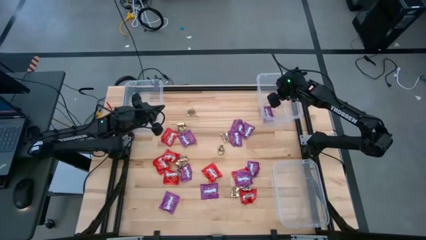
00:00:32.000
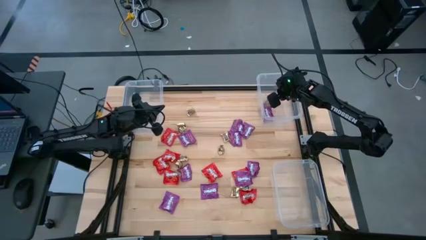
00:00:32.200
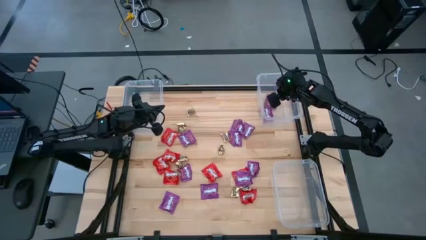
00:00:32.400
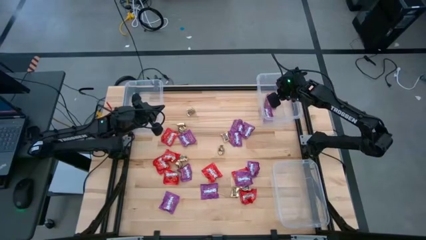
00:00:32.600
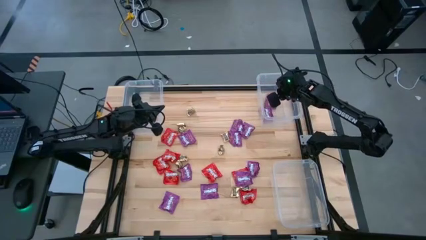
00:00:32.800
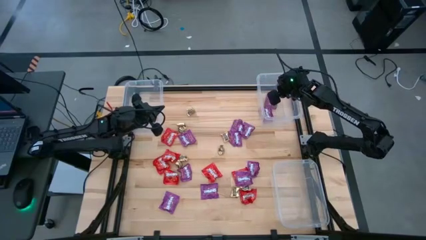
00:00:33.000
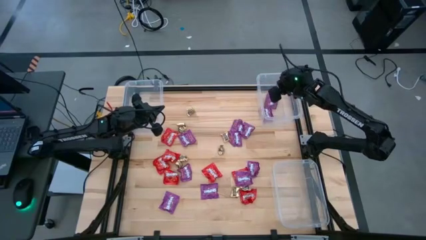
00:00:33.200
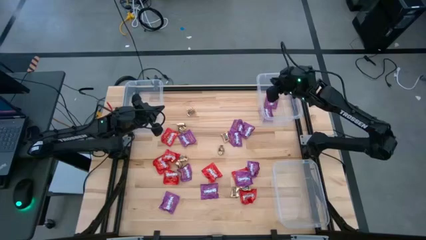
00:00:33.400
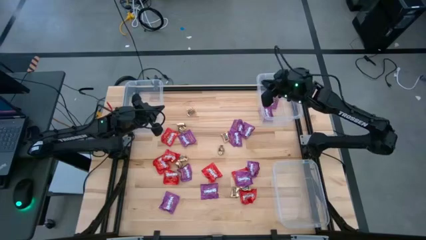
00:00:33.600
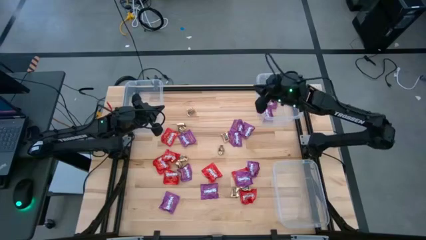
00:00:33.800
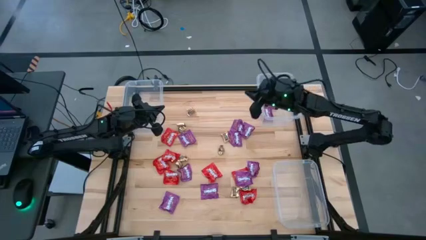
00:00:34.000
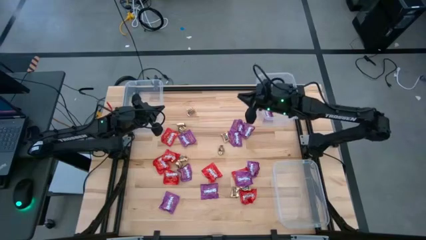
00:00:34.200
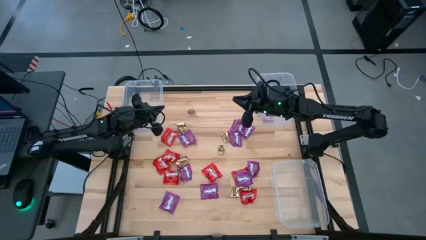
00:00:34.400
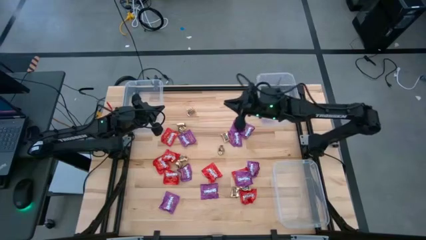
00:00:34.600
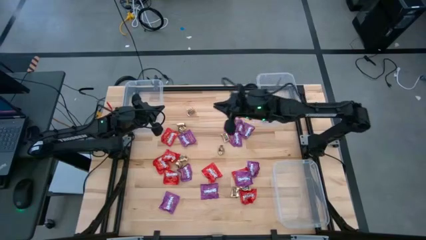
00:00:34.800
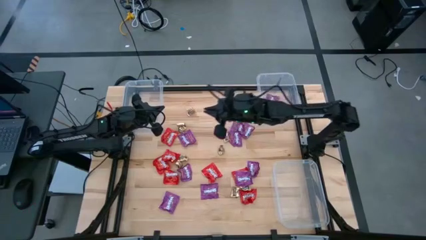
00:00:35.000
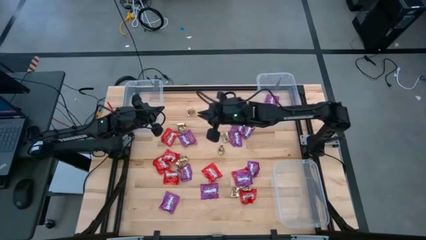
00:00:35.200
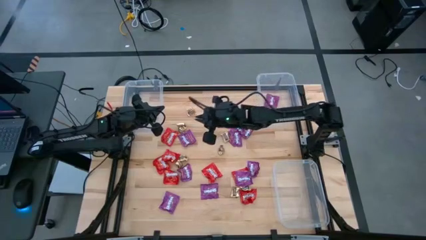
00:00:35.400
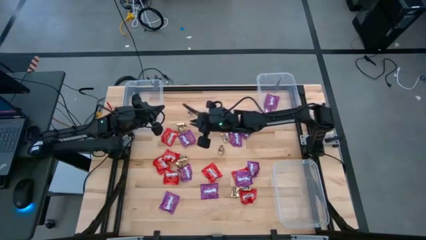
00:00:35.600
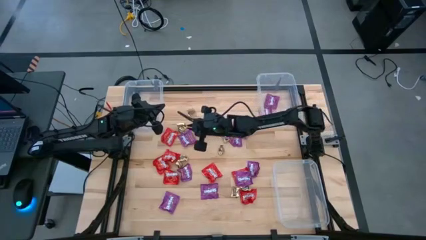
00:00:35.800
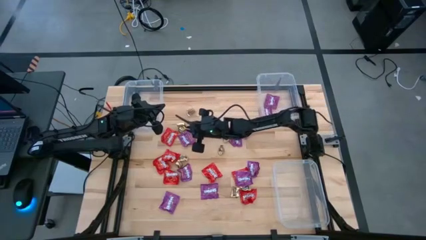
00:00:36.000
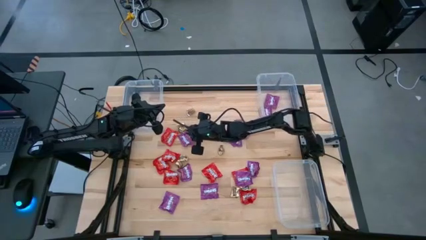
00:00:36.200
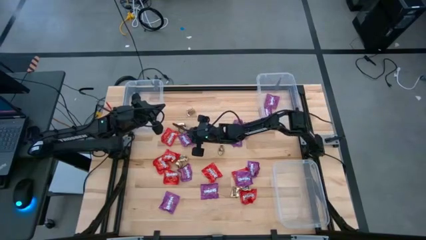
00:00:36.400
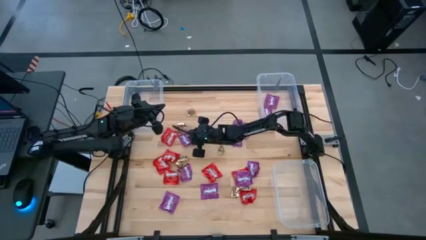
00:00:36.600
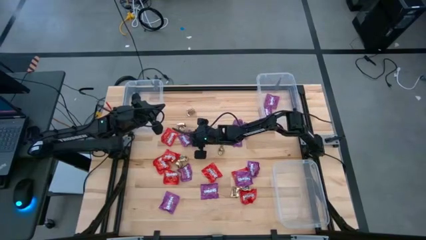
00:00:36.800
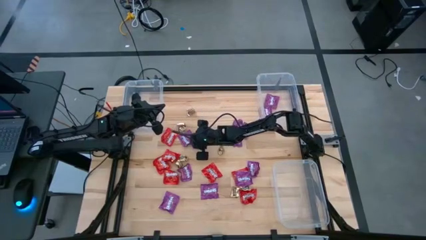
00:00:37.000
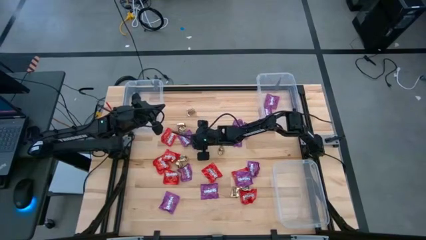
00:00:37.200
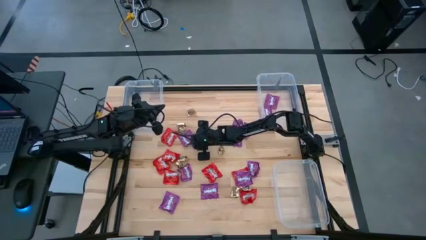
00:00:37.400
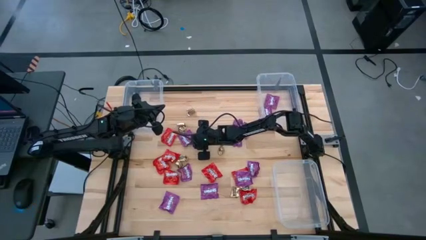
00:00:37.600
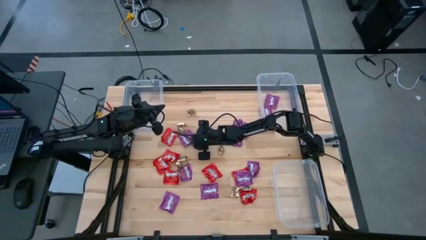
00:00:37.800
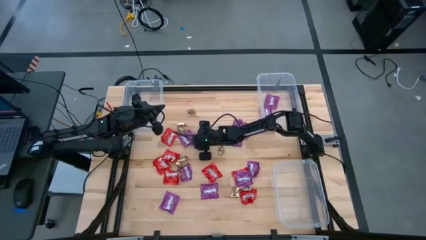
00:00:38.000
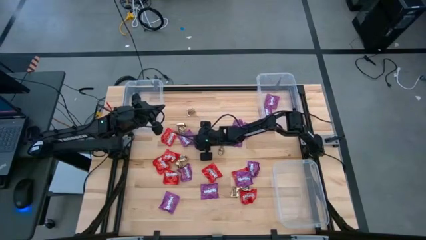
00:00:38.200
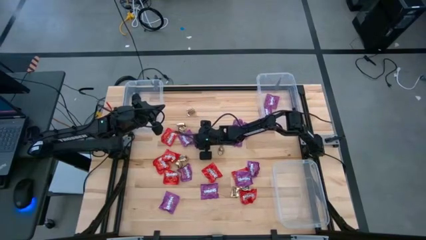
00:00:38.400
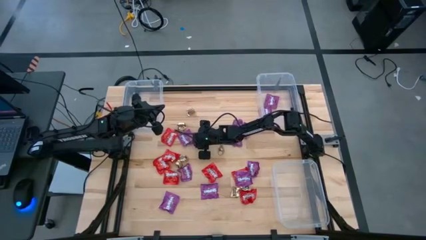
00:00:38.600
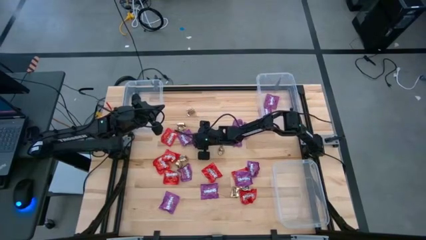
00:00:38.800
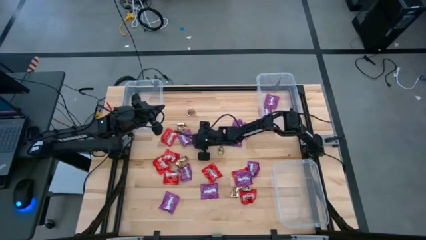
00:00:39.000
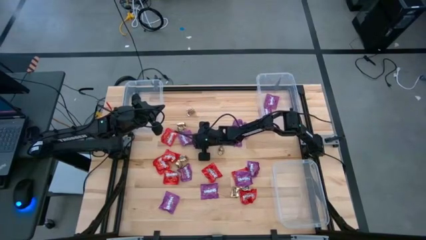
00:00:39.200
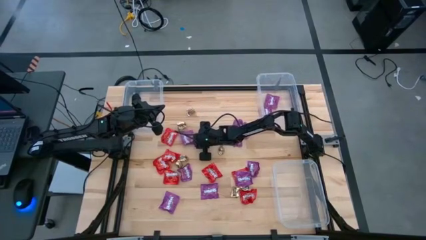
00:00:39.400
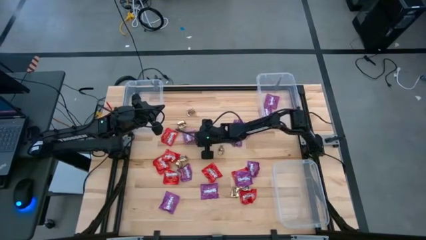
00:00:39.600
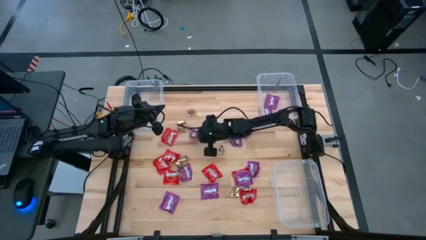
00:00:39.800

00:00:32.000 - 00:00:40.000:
Task: Sort candy
Put the purple candy into the top right transparent bin

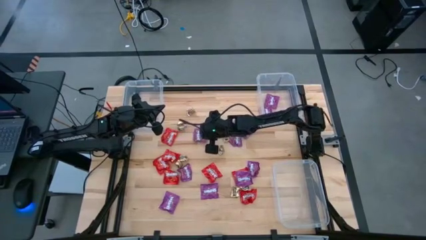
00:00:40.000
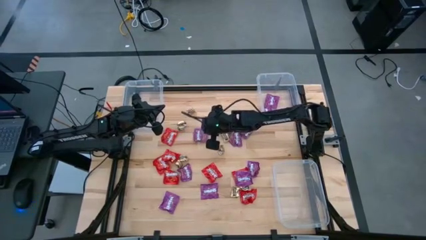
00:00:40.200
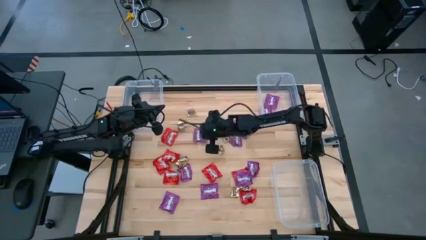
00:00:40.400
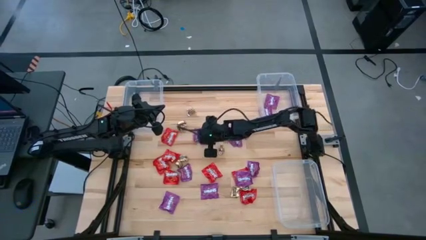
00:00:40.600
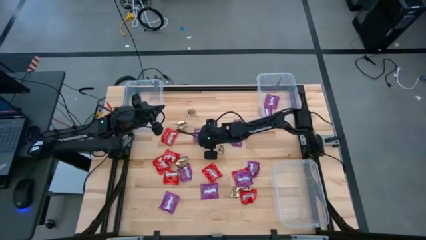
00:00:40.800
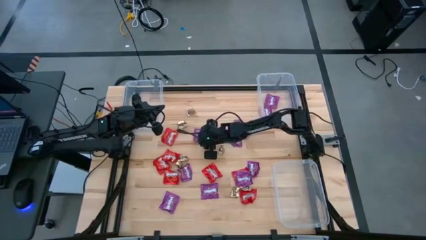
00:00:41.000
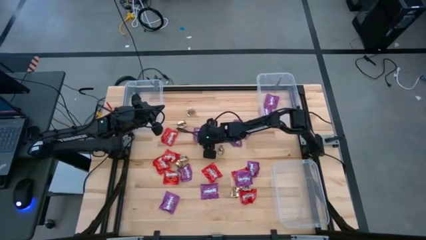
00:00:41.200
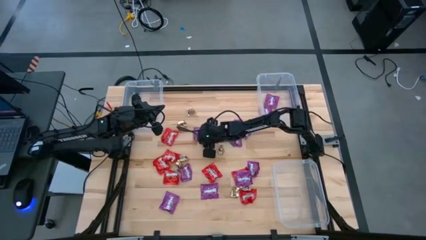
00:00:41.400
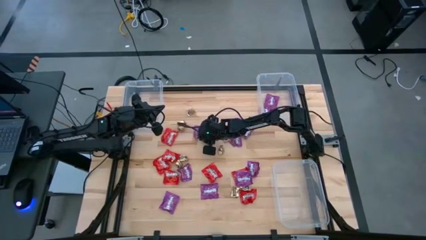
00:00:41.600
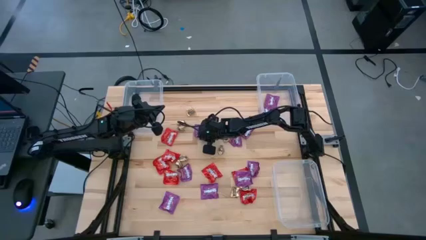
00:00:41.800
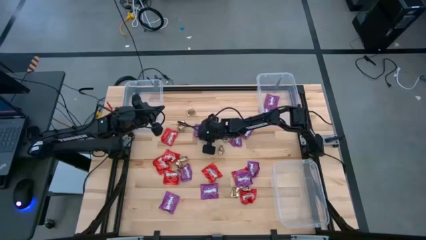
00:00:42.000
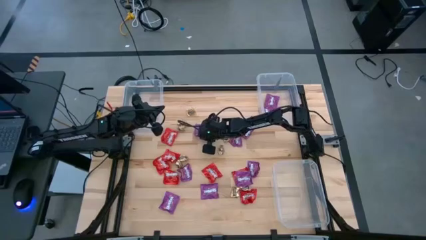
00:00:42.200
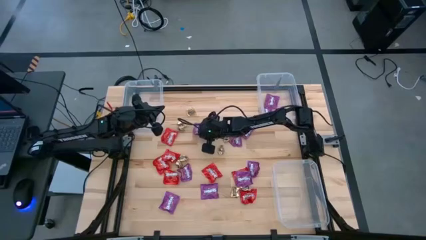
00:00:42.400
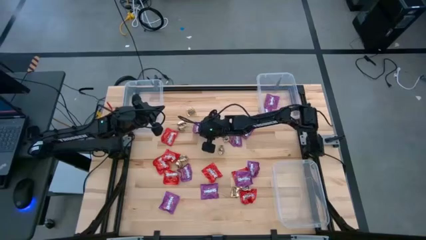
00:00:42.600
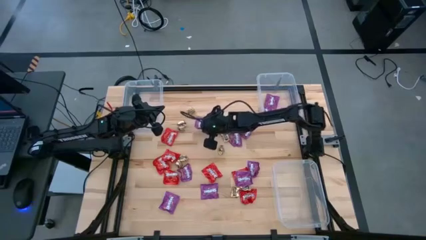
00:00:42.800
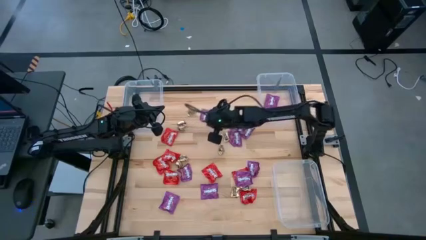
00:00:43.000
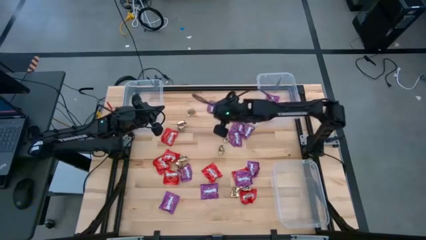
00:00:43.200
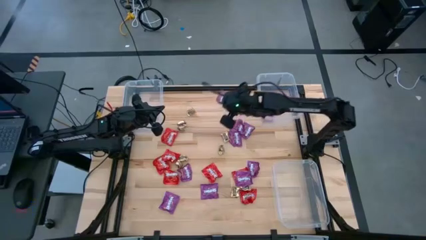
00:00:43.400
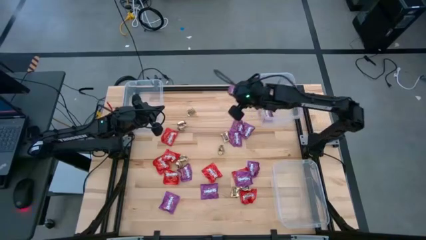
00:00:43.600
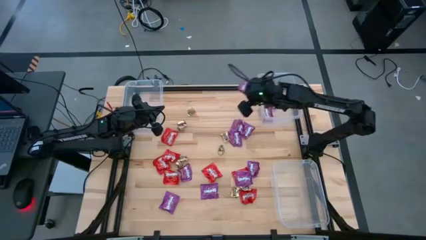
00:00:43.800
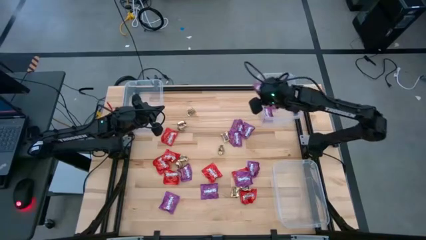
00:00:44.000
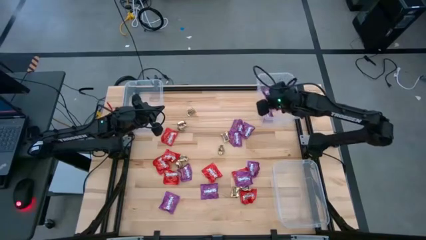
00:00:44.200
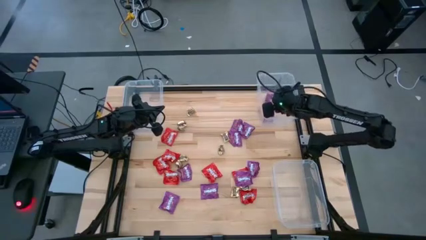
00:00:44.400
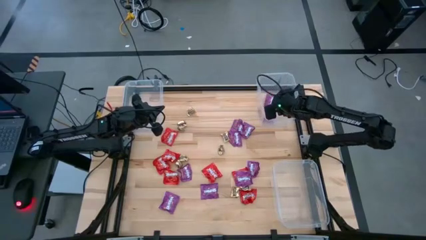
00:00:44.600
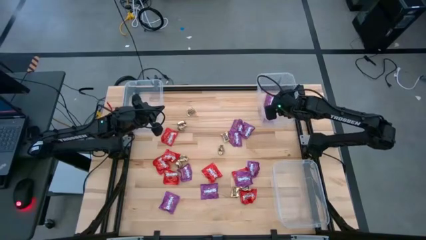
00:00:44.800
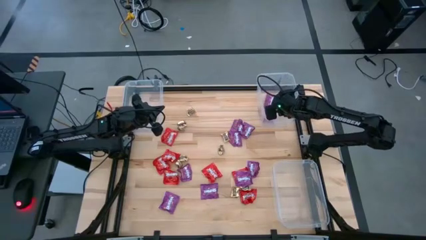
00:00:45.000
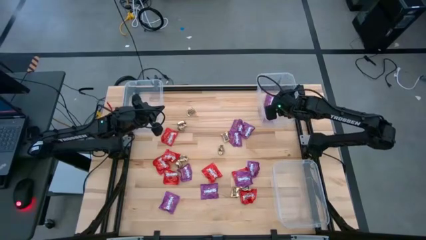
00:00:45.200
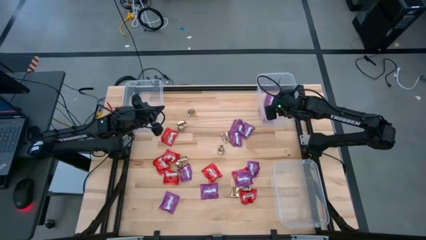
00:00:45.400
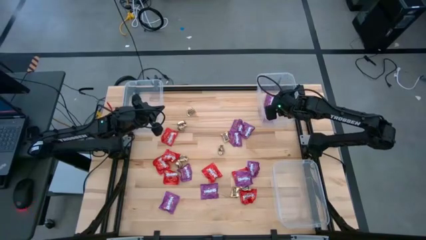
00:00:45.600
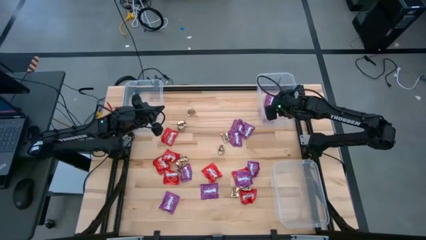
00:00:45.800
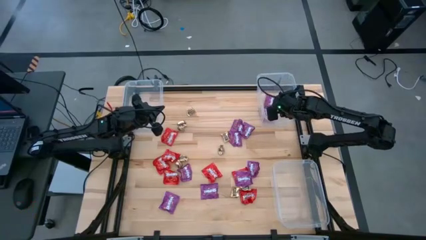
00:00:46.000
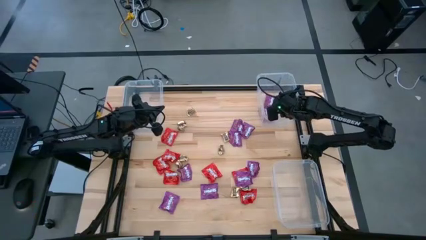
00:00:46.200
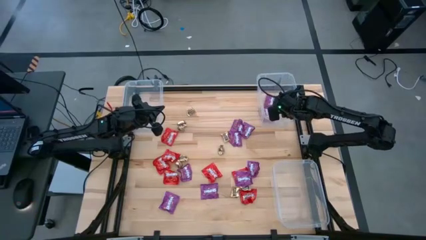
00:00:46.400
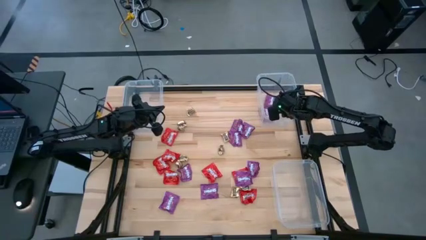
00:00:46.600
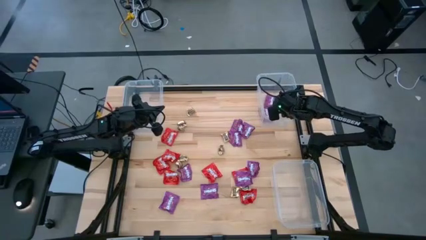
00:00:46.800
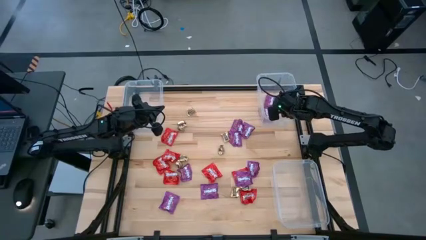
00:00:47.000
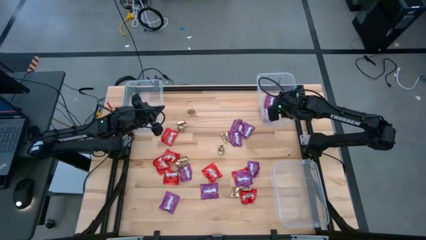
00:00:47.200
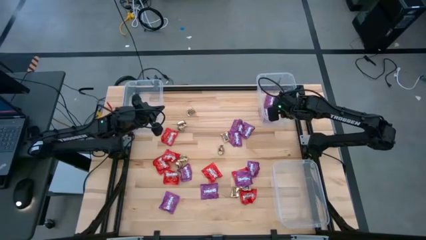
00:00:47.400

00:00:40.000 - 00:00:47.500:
Put the purple candy into the top right transparent bin

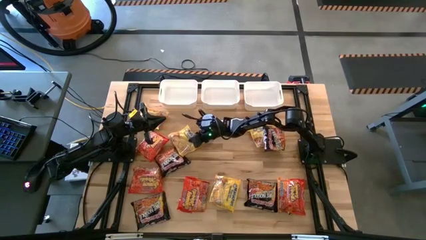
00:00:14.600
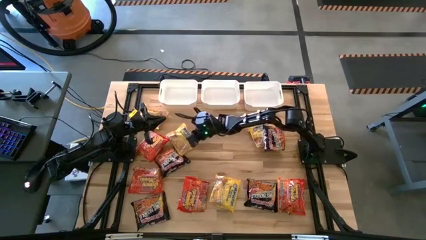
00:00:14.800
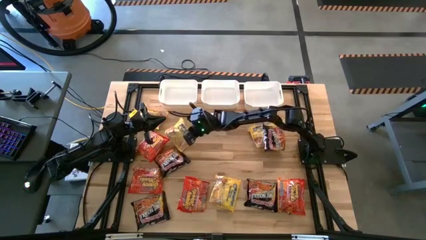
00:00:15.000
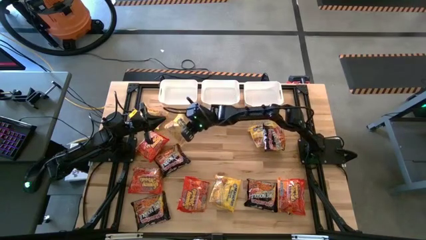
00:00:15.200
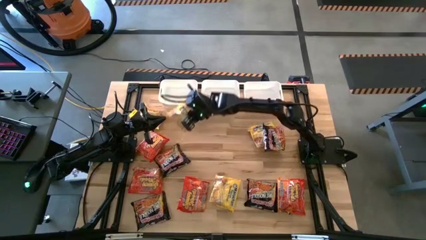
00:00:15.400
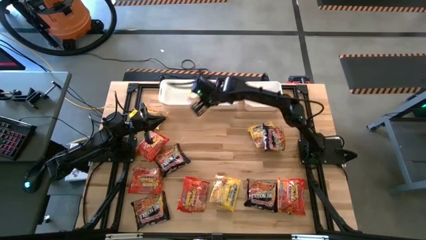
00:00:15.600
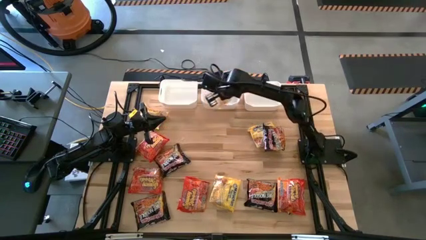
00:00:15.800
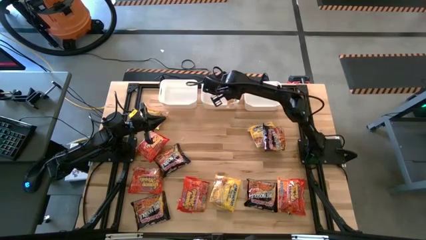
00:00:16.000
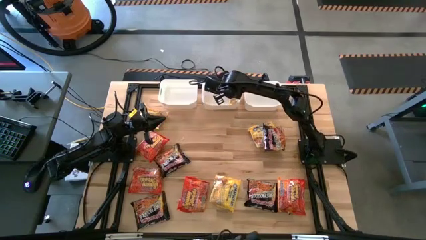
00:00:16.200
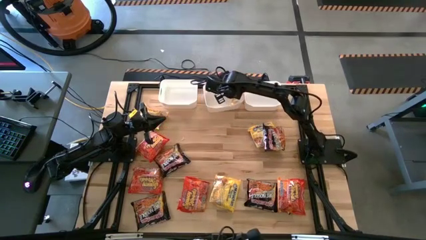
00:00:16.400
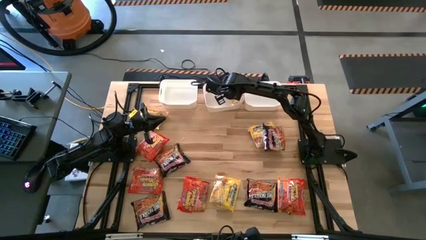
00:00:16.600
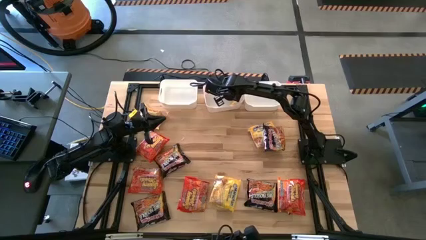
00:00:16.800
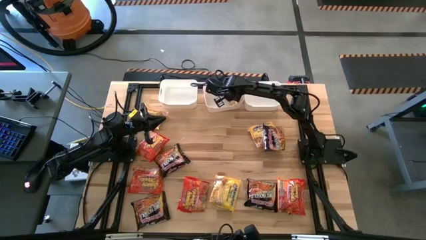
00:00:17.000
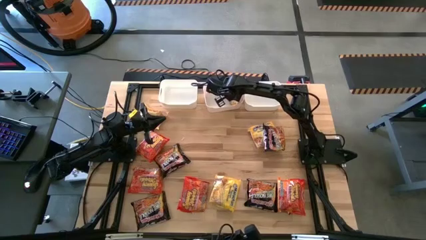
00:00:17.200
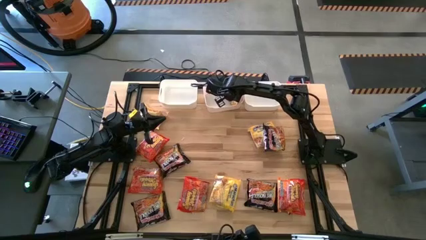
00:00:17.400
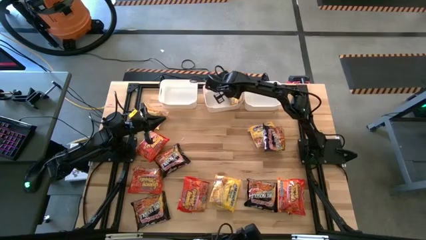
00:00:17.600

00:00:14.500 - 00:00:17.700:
Task: Sort Maruchan noodles
Put the yellow noodle into the center white bin
